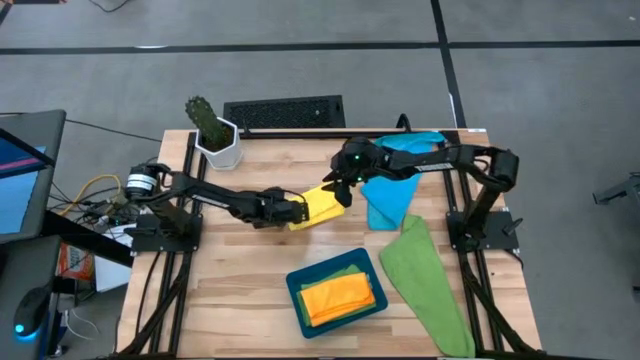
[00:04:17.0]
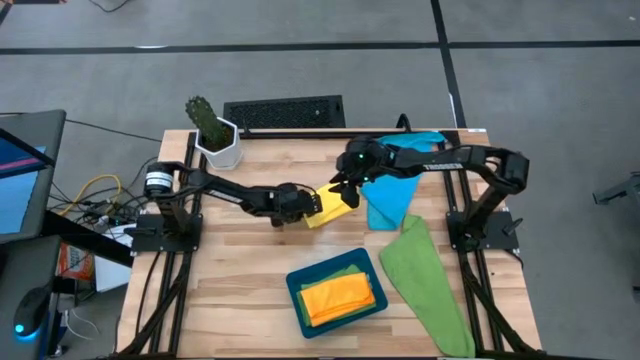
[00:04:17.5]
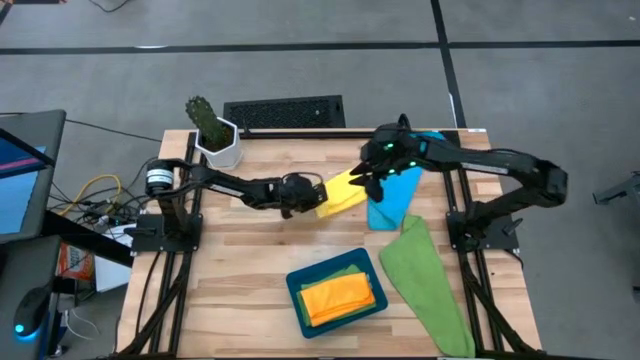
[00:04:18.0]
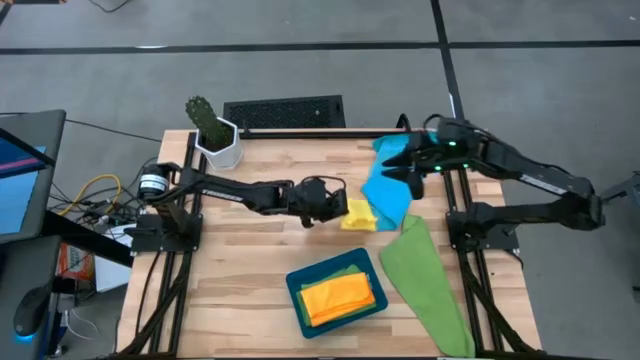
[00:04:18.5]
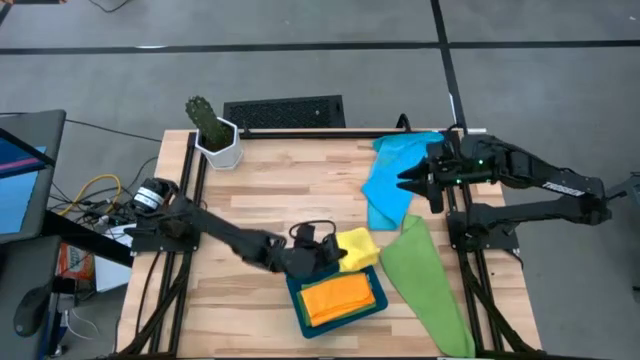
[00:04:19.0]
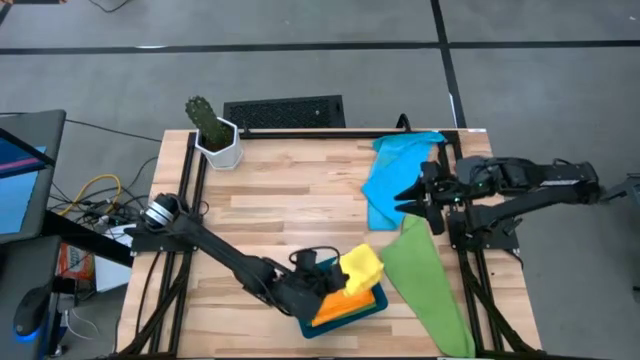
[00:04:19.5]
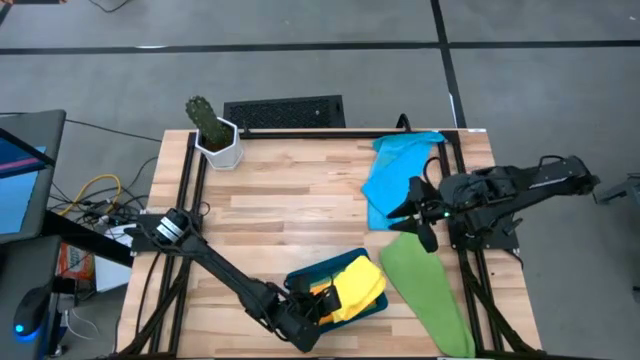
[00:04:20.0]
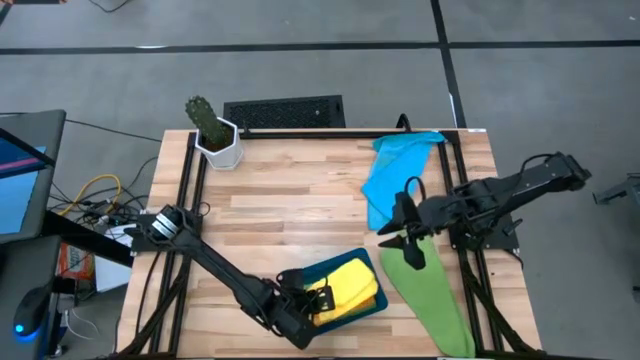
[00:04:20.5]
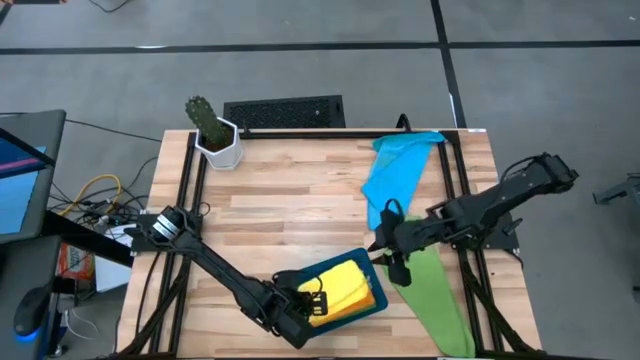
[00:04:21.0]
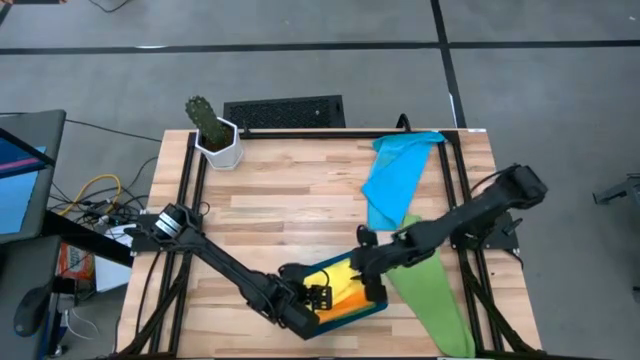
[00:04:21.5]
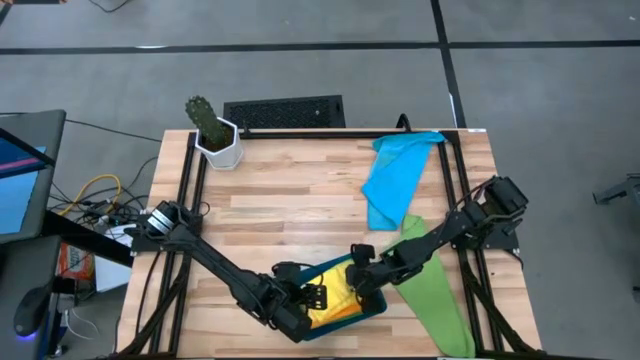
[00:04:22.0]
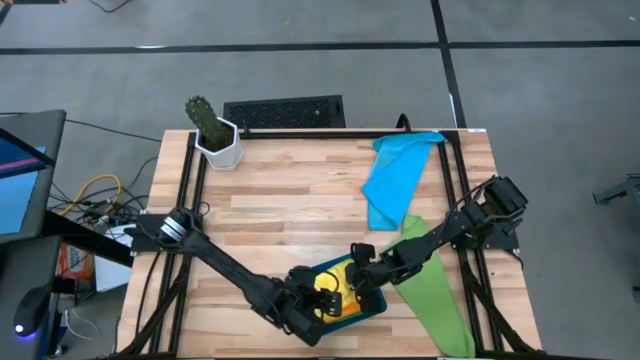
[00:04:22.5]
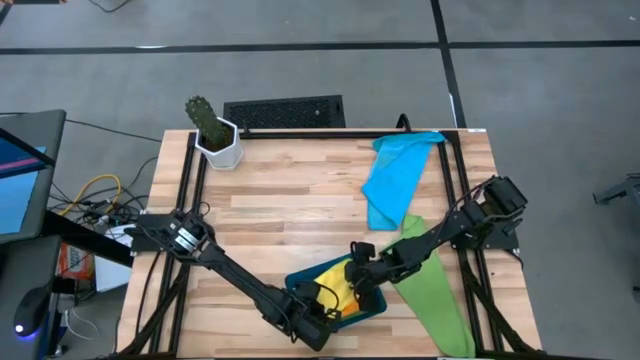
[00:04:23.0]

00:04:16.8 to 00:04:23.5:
Task: Fold microfiber towels
Put the folded yellow microfiber towel into the blue bin

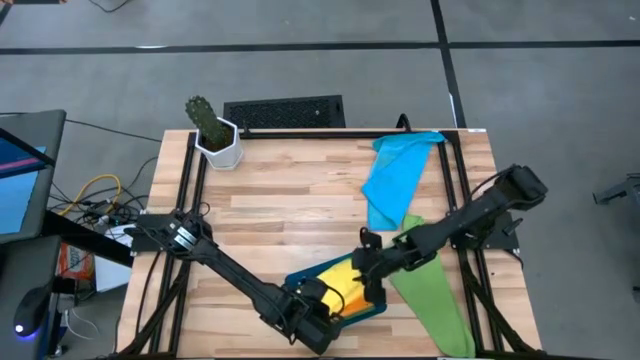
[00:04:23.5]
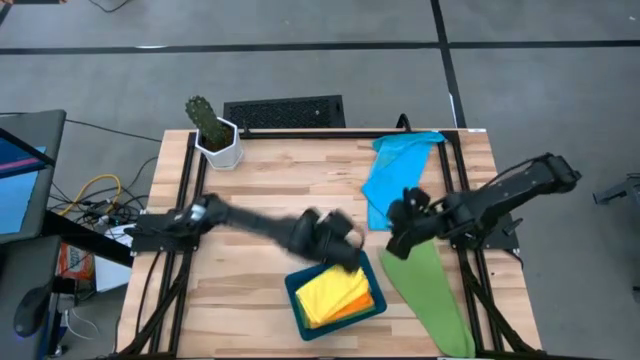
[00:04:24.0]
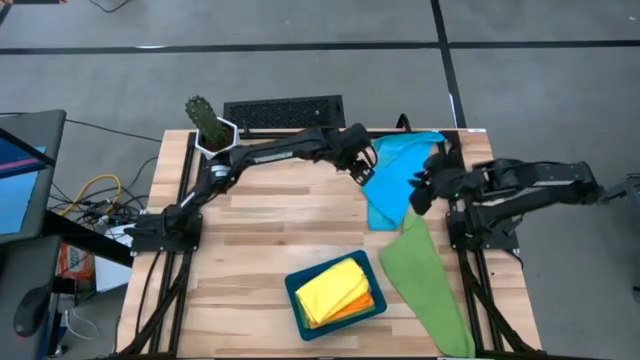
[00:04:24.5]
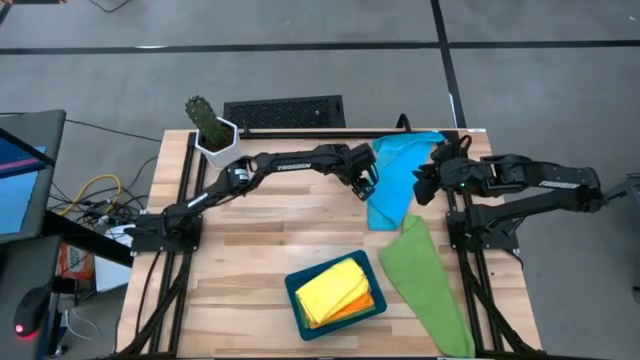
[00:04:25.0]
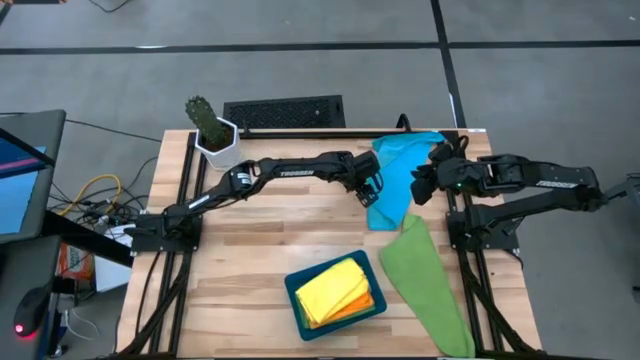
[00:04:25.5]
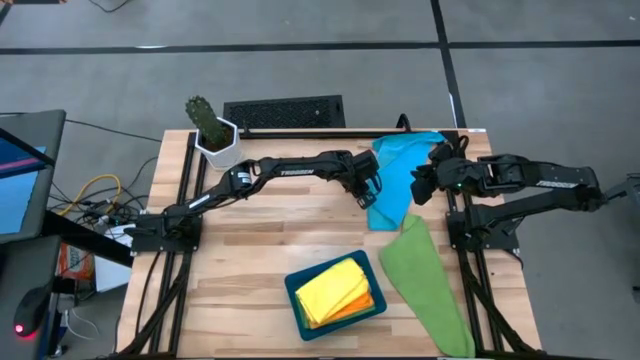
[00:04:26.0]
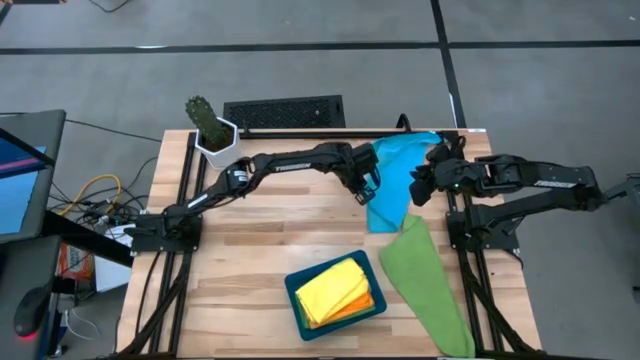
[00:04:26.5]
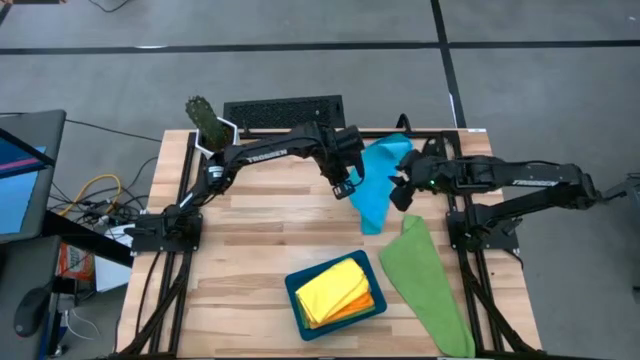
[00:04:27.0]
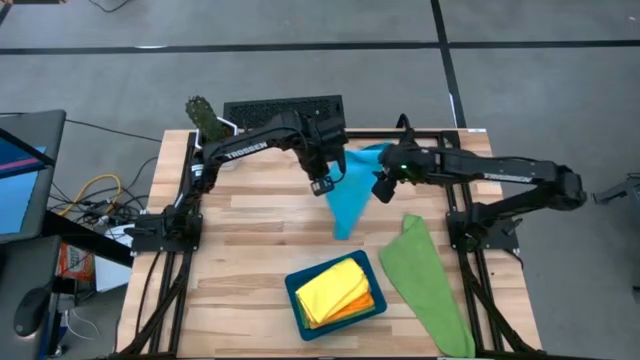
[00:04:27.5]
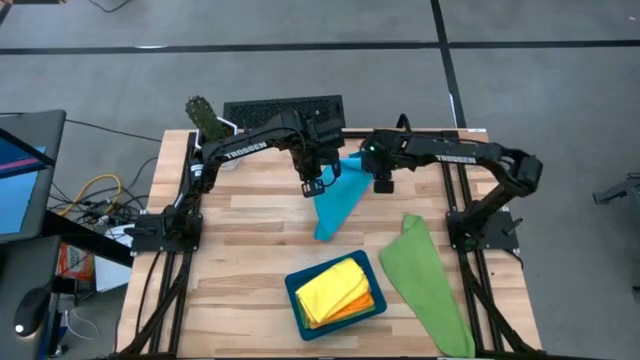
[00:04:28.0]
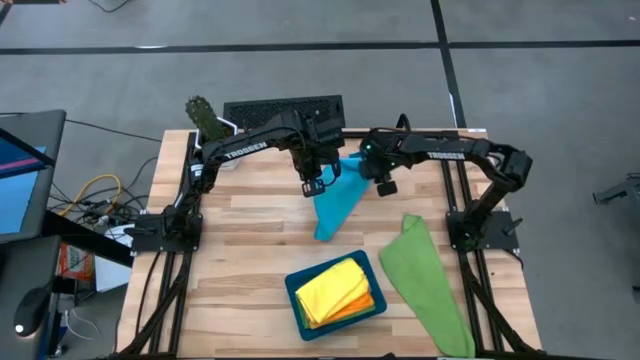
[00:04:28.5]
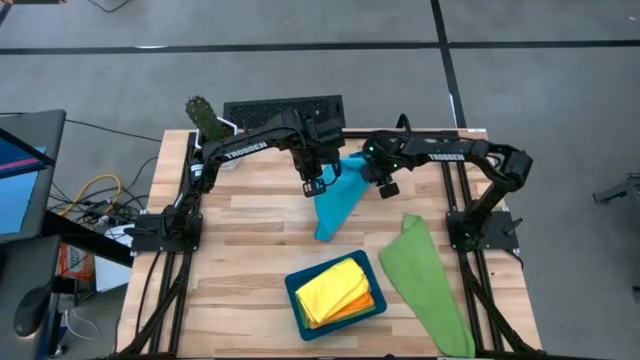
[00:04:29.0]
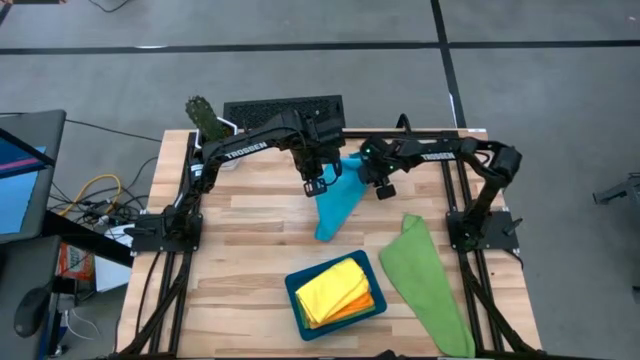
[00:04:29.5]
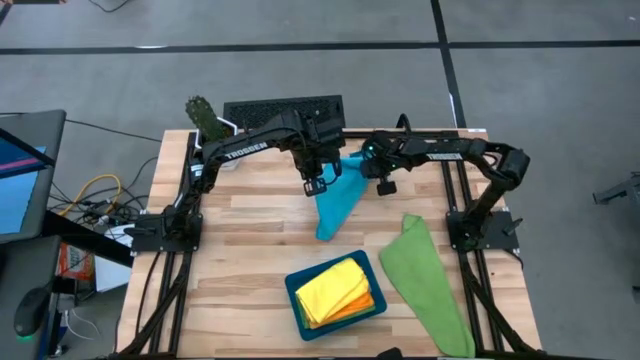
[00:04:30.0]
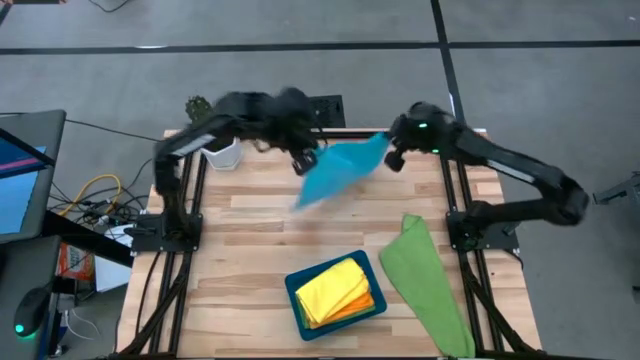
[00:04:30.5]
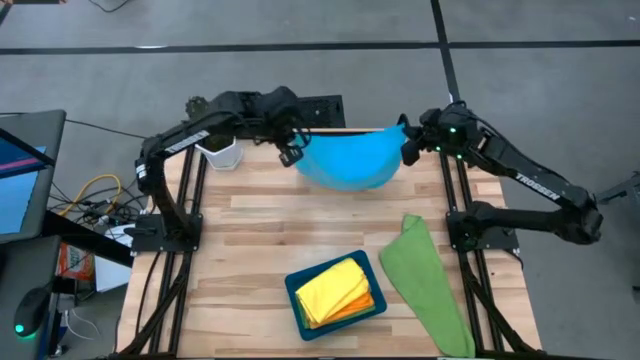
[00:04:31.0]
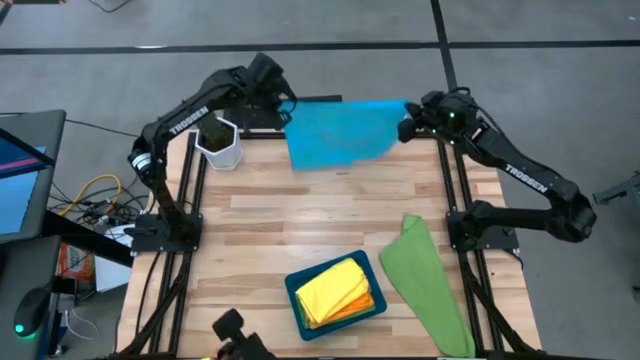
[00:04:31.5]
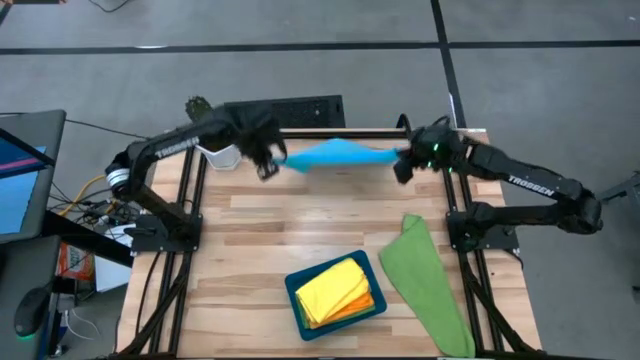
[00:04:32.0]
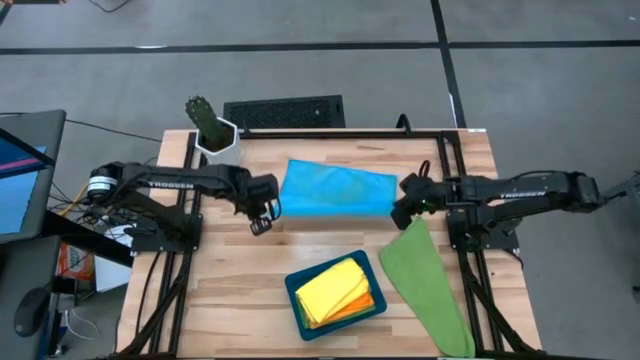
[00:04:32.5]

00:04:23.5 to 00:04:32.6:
Fold the blue microfiber towel

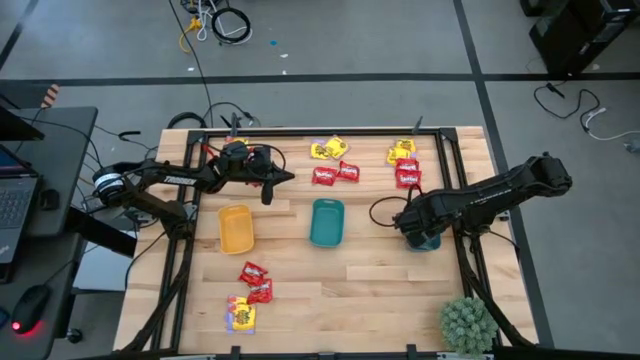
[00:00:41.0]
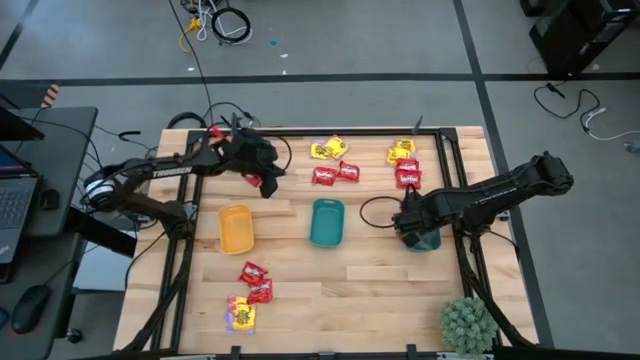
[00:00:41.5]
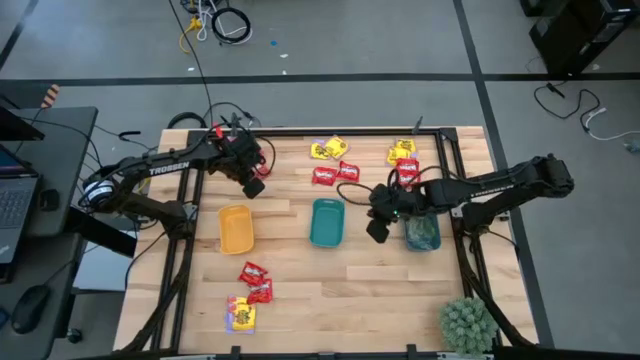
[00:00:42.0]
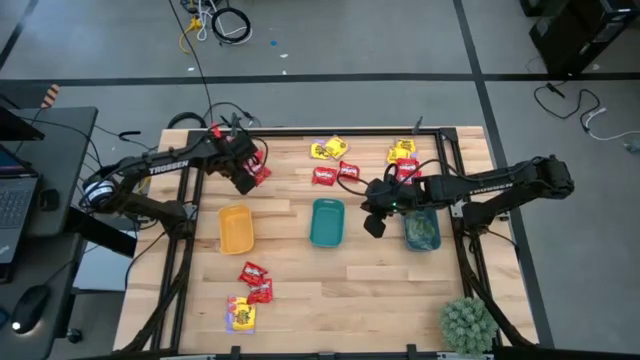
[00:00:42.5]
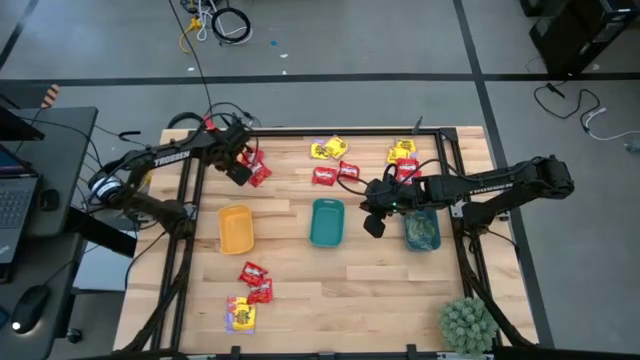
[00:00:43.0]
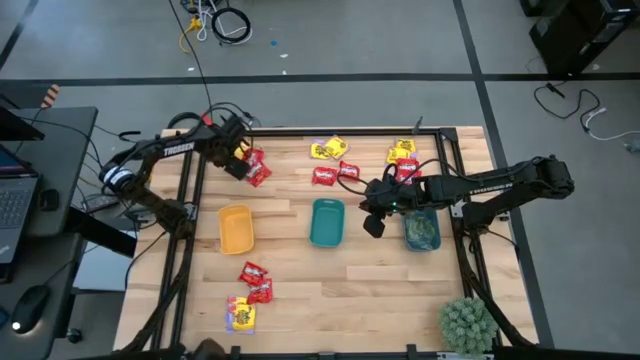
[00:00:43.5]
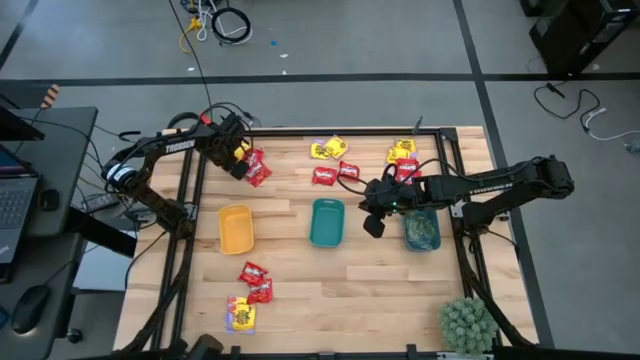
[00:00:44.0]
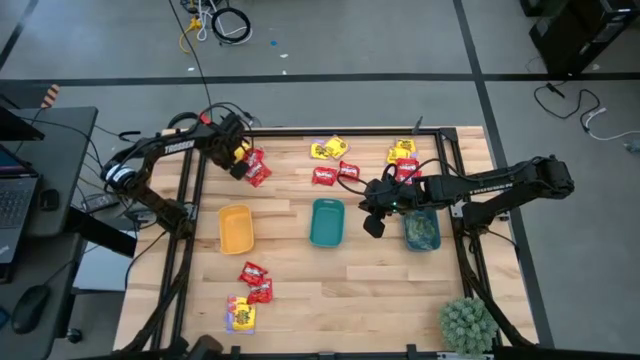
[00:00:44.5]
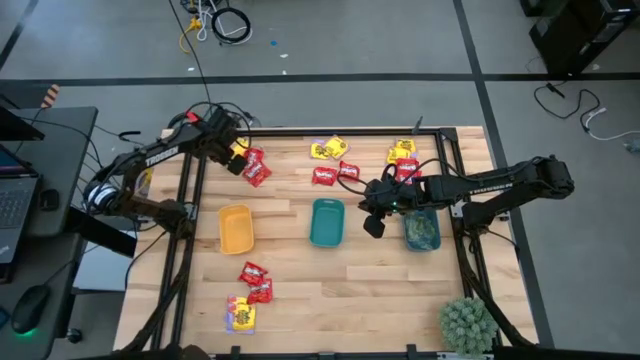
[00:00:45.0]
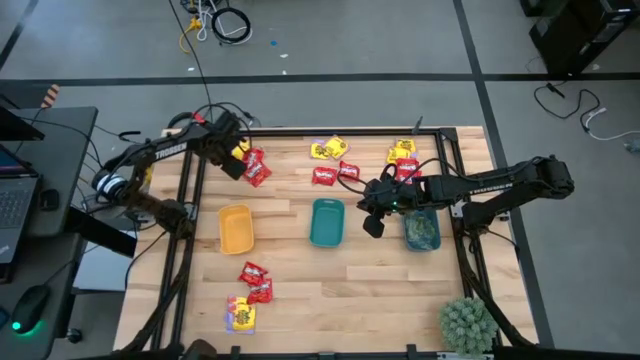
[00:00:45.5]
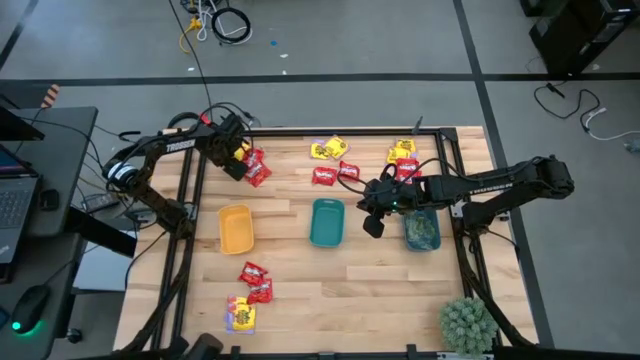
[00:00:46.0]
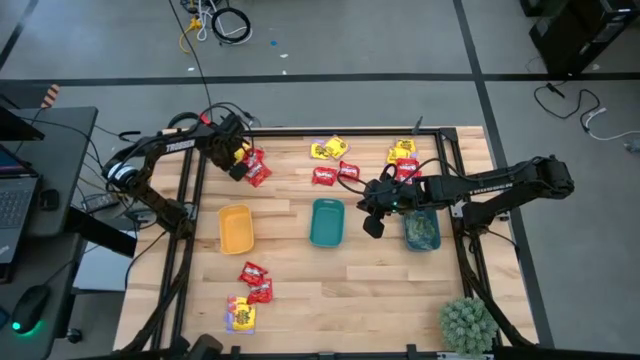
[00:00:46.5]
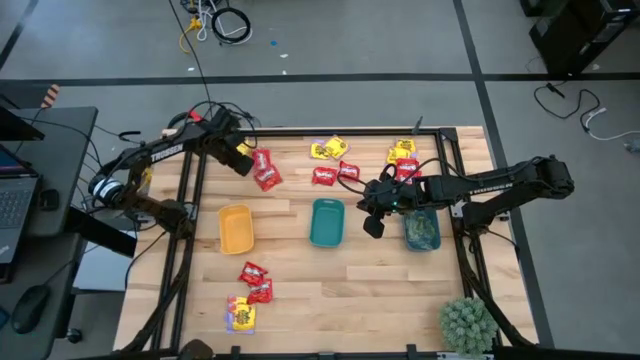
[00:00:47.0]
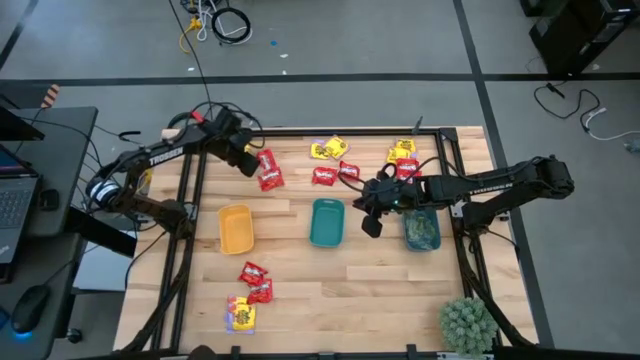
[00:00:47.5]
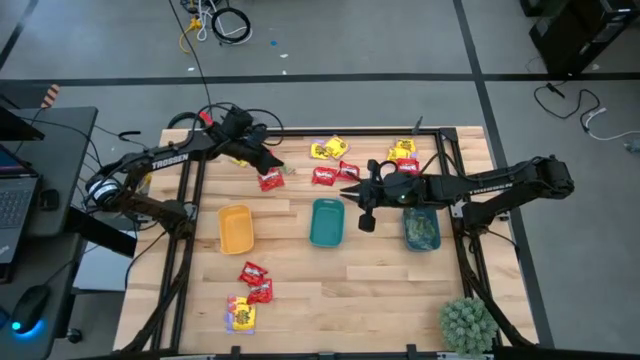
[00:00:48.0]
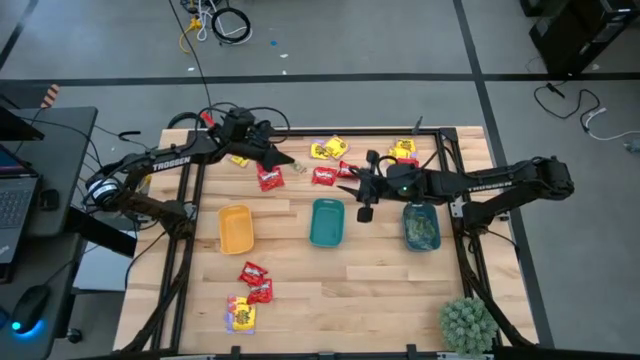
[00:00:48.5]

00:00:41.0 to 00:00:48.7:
Task: Sort candy
Put the green transparent candy into the blue bin
